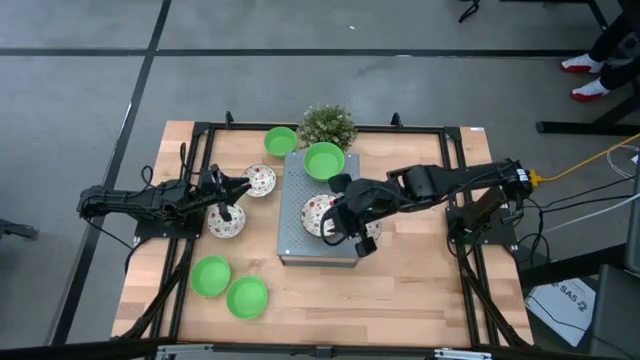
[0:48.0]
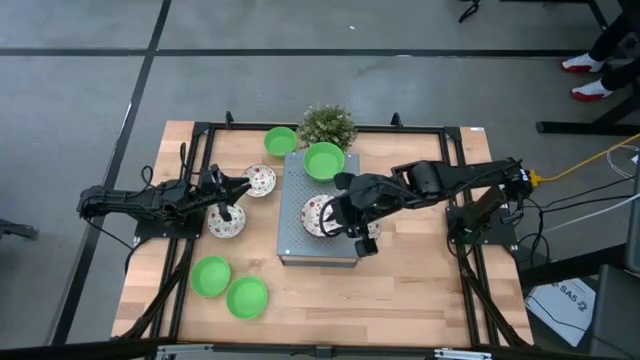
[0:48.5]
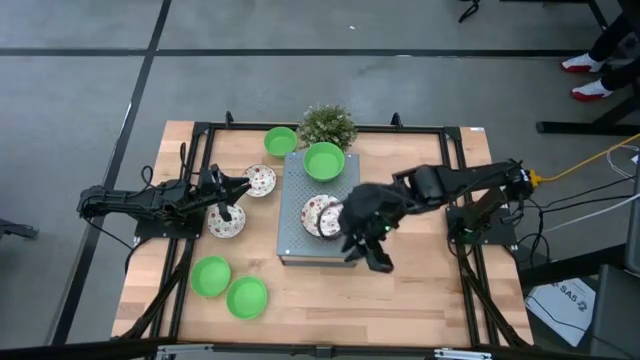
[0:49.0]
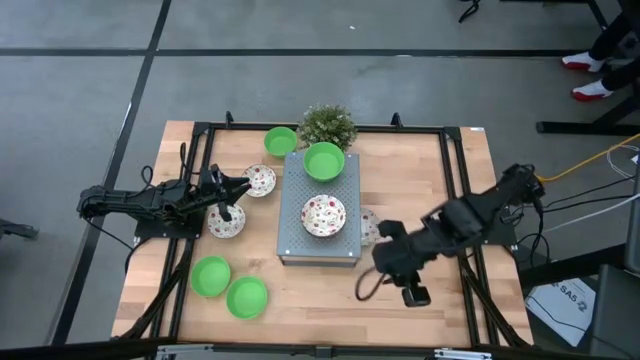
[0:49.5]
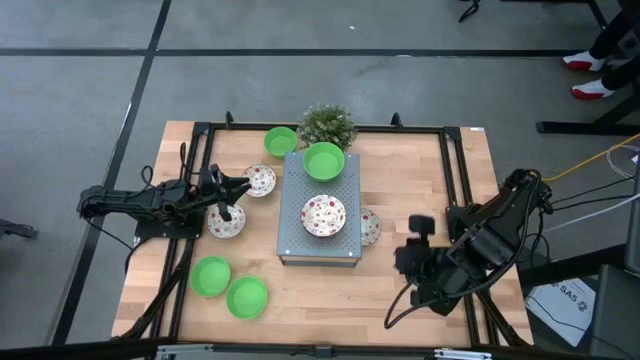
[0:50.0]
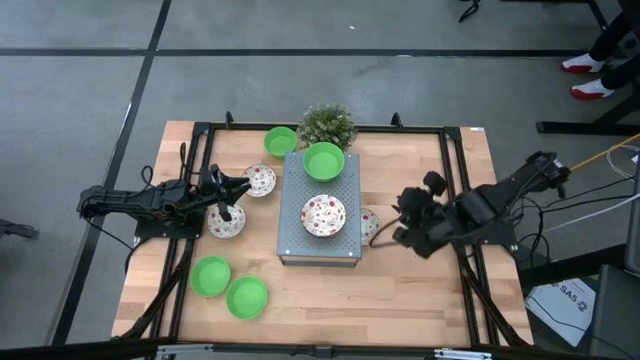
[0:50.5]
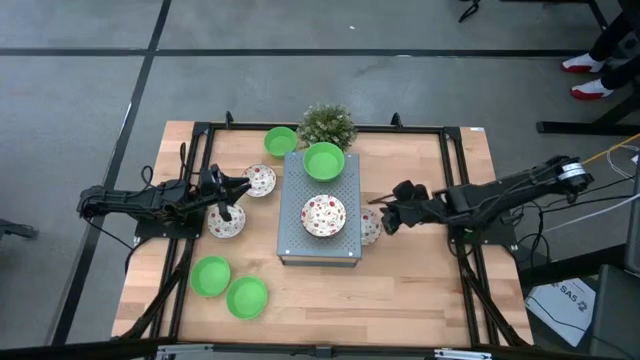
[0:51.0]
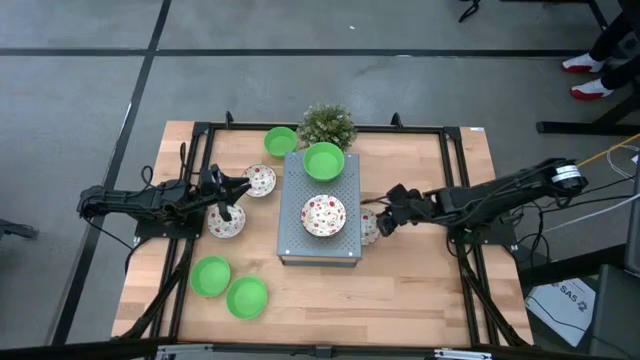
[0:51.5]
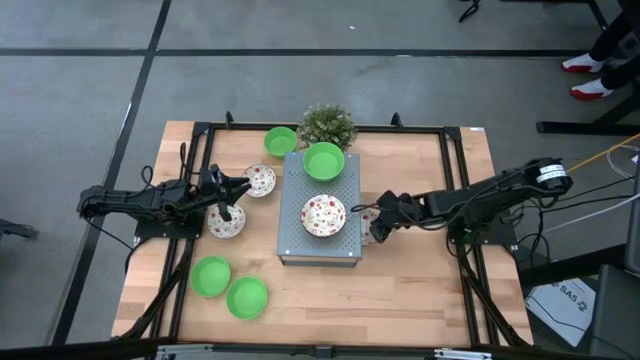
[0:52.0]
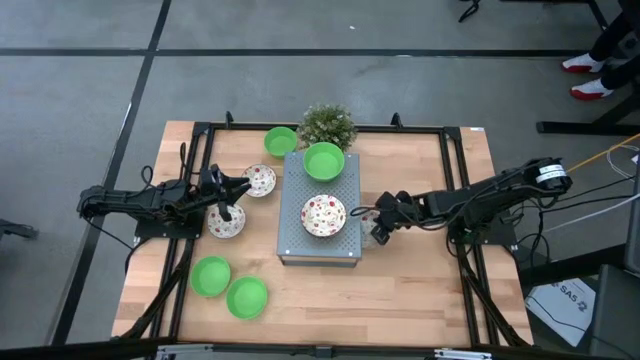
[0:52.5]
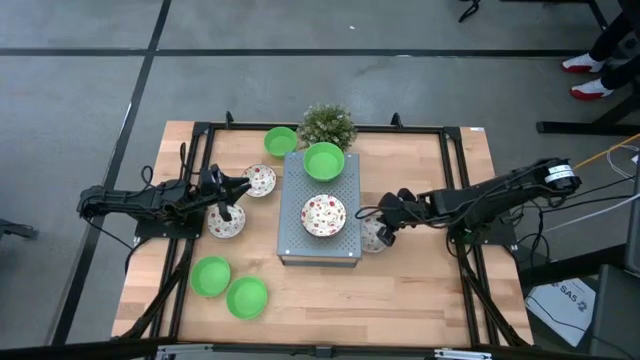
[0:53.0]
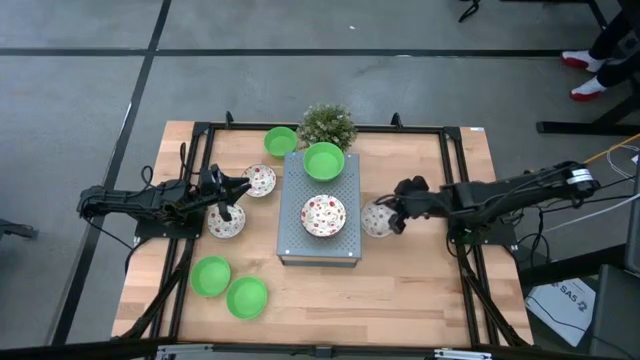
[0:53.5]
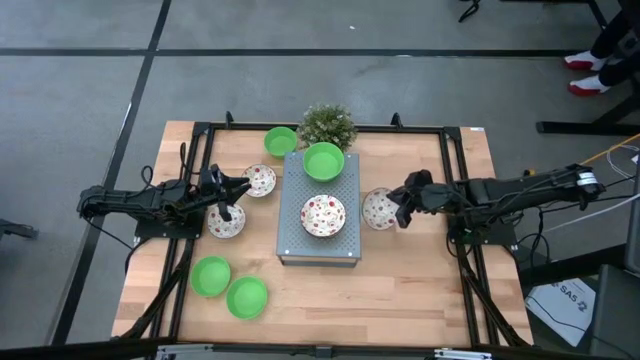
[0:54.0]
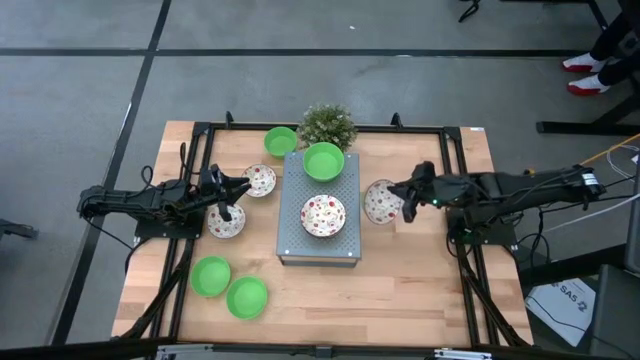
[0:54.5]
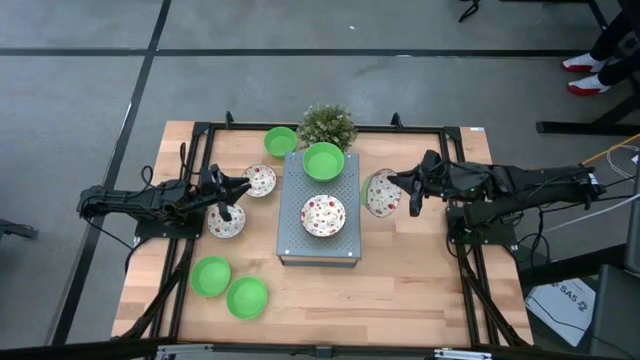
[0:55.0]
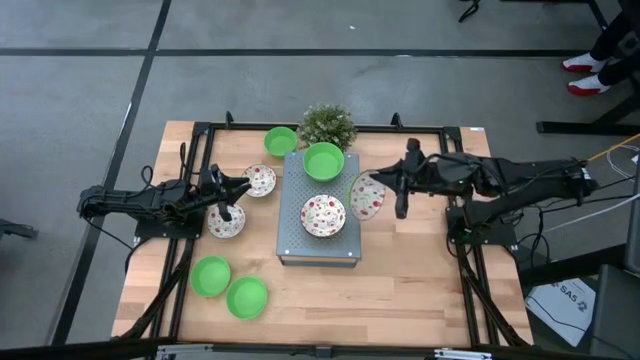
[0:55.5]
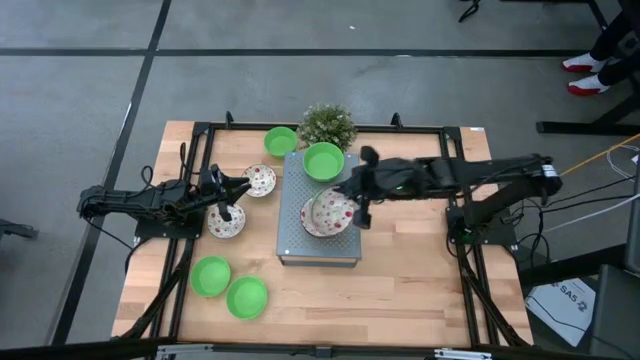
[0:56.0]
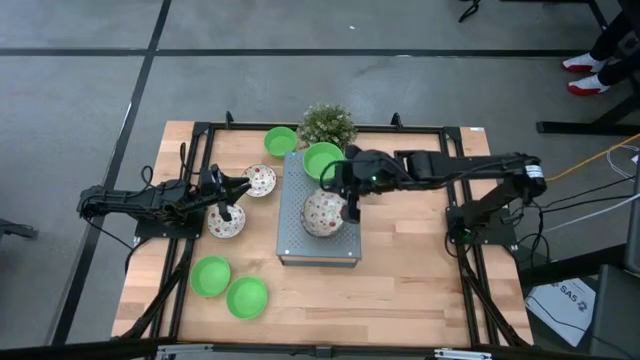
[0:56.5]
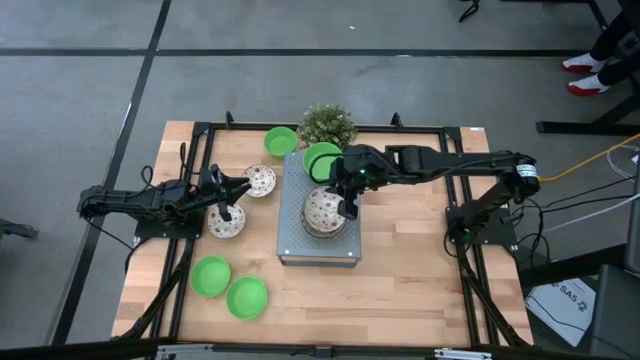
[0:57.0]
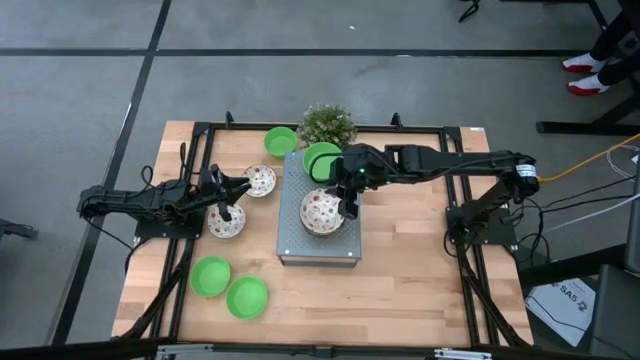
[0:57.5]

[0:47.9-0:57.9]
Task: Pick & Place Mini bowls
Stack the red patterned bowl on the red patterned bowl on the shelf

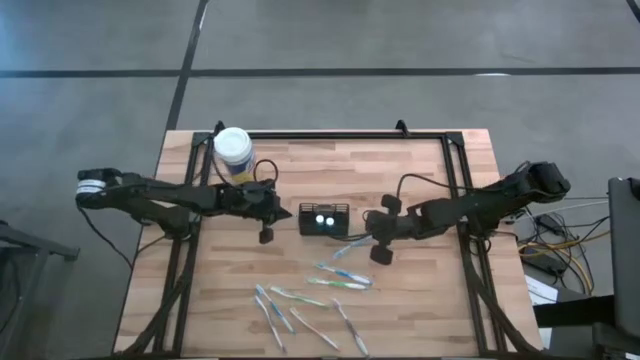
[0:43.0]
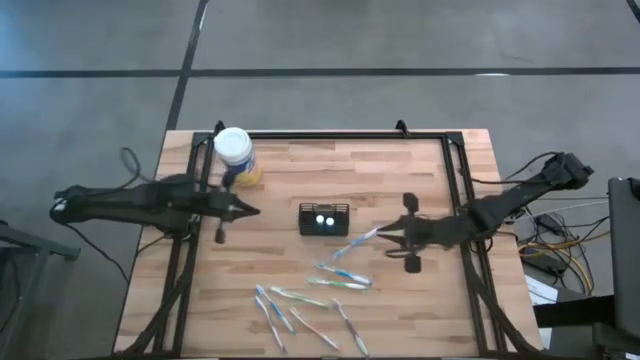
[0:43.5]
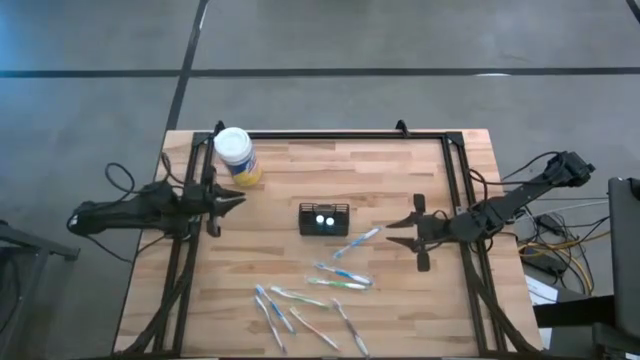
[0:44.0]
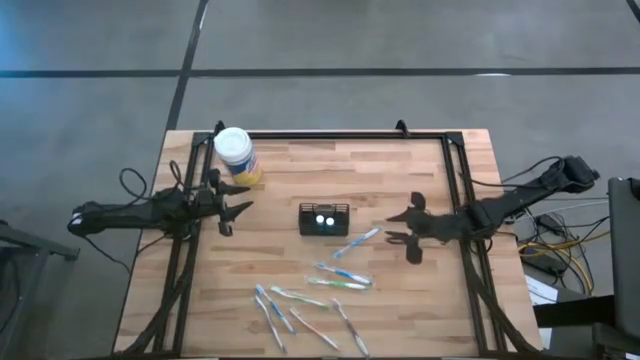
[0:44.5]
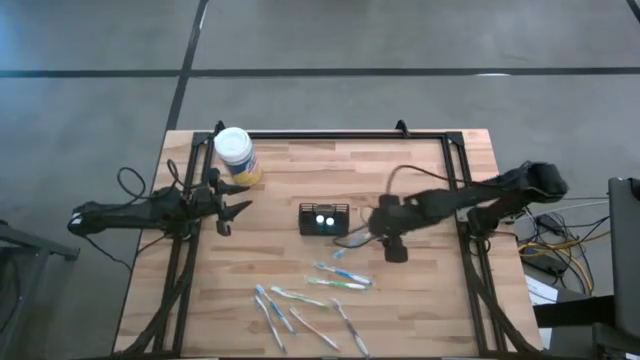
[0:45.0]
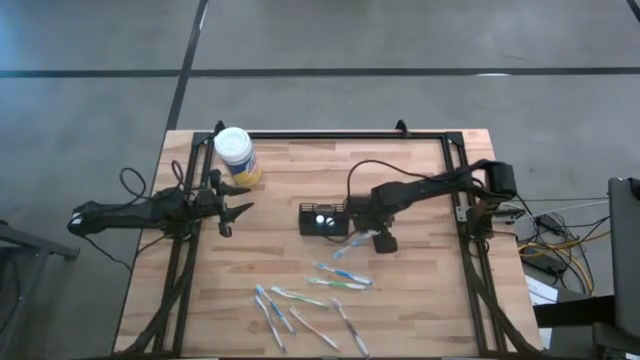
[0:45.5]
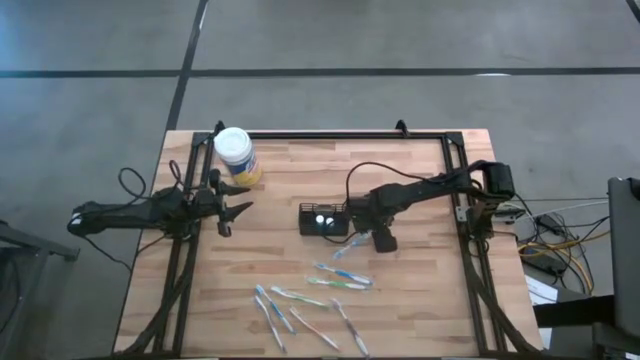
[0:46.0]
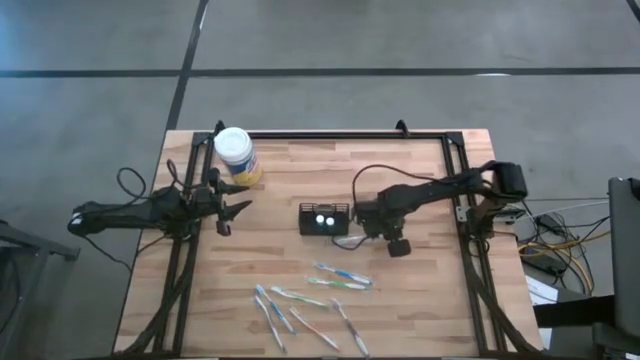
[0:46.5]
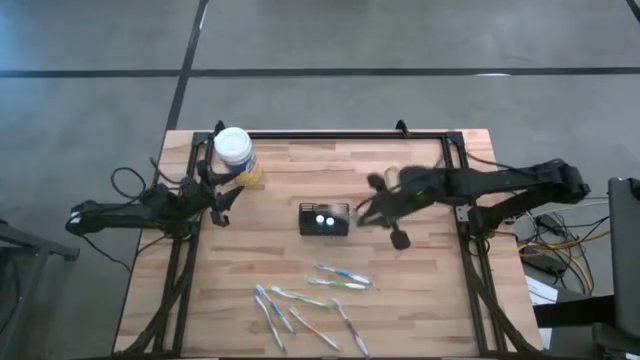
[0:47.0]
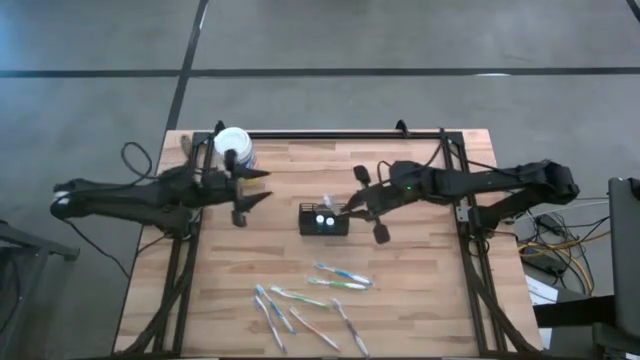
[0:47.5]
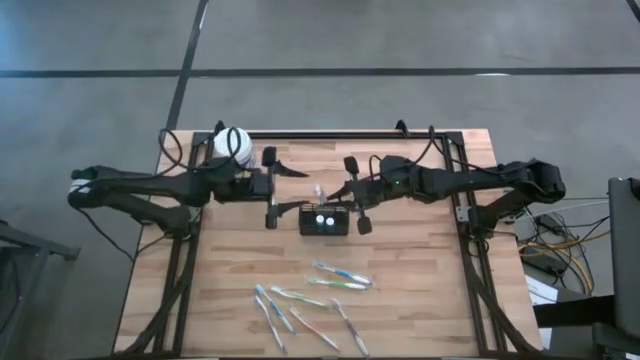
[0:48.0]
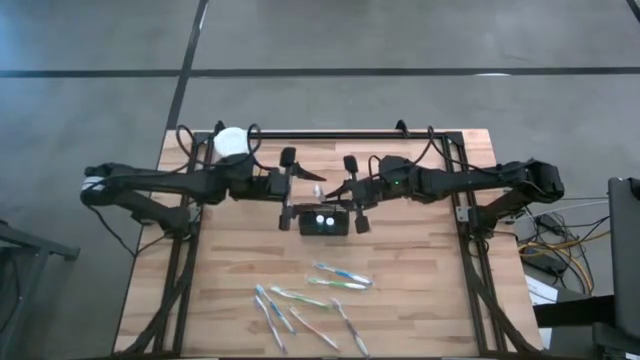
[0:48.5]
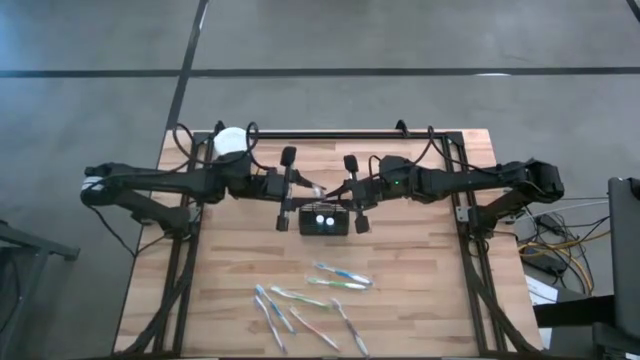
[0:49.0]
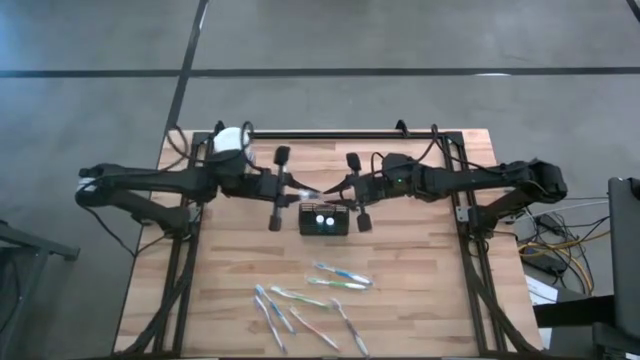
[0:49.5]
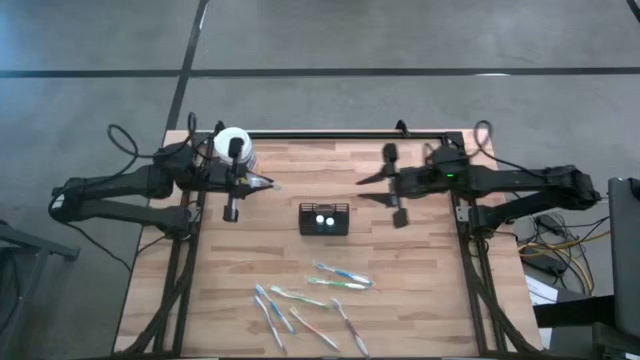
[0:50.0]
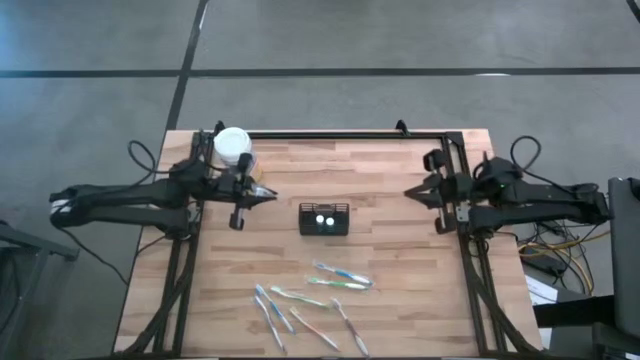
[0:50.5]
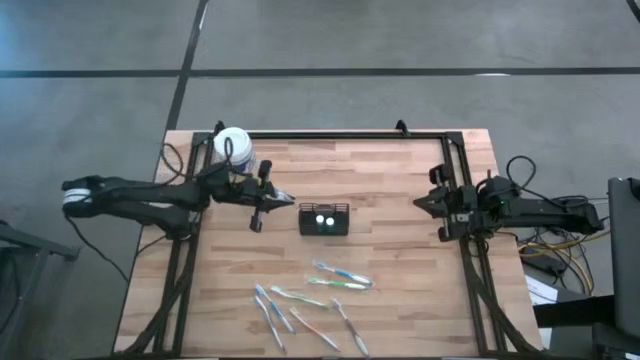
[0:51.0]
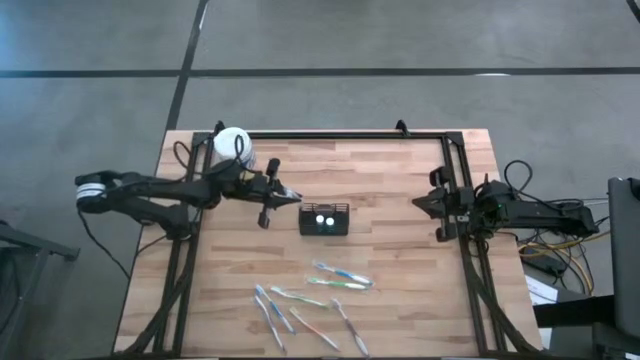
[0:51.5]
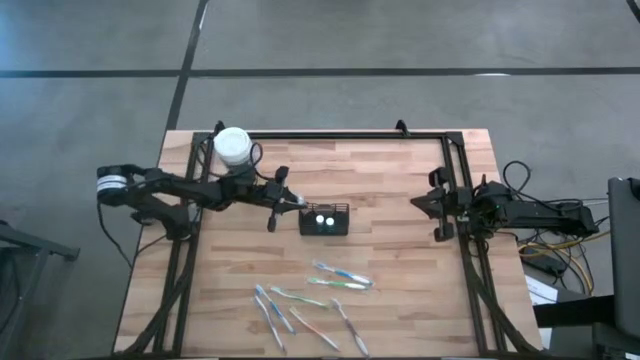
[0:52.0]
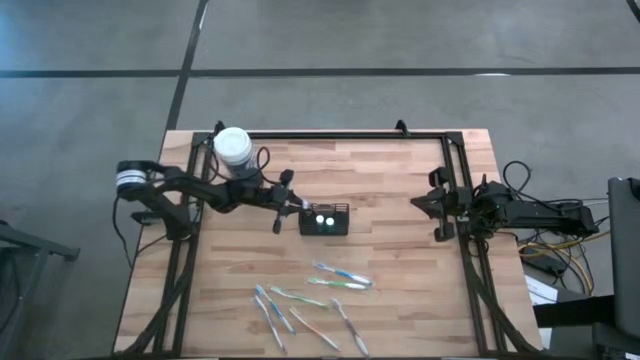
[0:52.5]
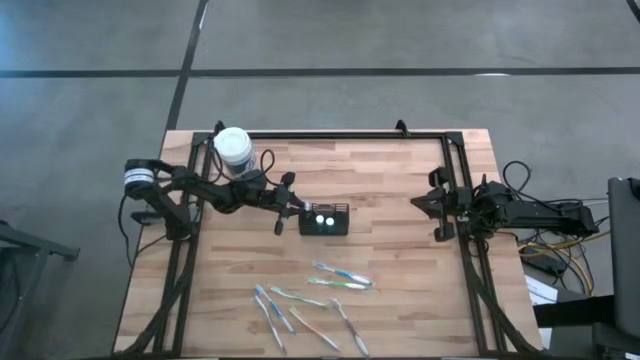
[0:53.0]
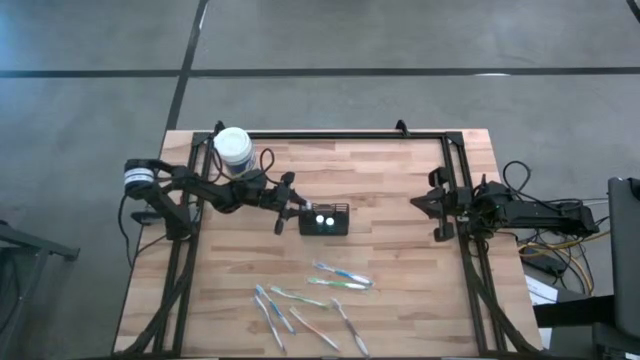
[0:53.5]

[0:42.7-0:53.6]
Task: Pick & Place toothbrushing station
Put the top blue toothbrush into the mesh organizer
